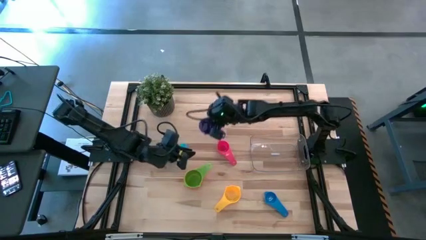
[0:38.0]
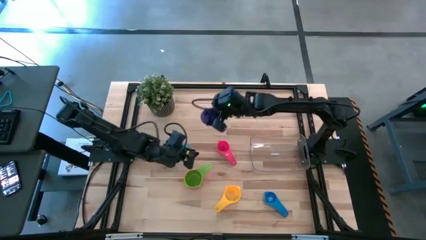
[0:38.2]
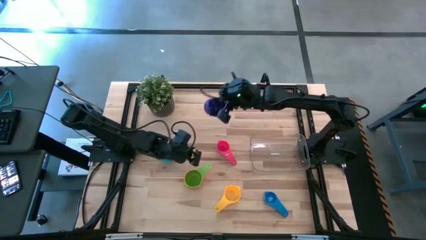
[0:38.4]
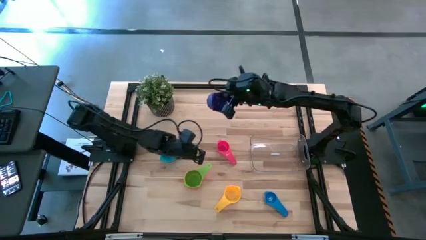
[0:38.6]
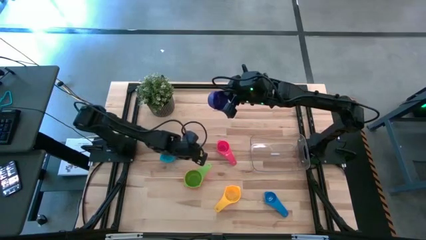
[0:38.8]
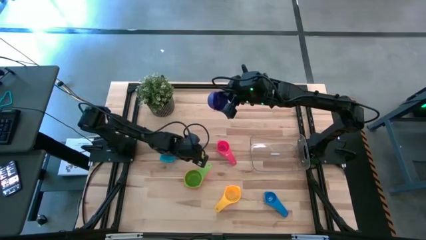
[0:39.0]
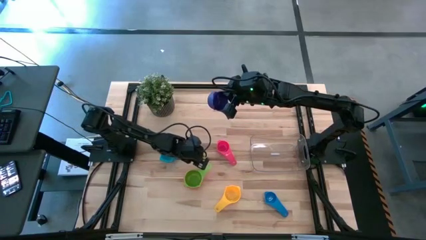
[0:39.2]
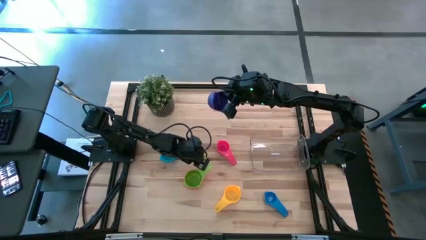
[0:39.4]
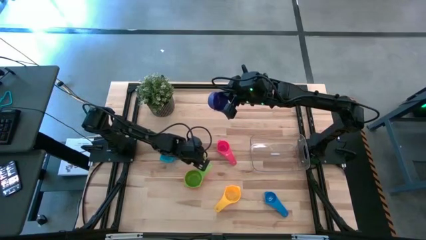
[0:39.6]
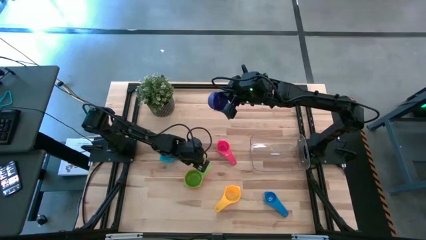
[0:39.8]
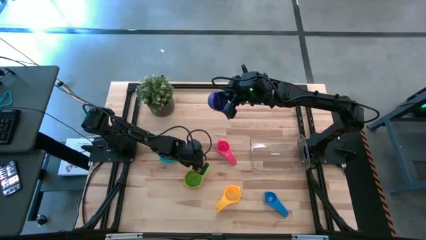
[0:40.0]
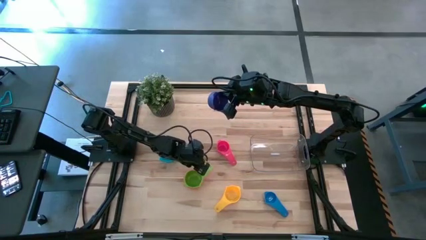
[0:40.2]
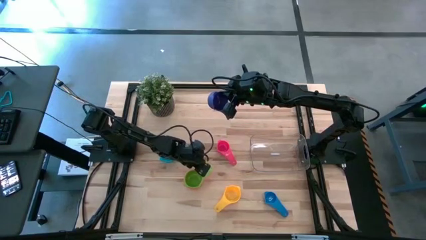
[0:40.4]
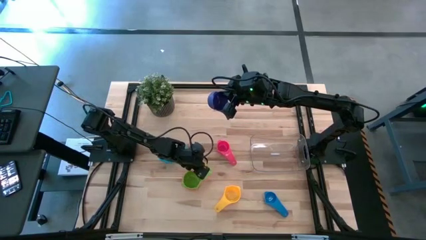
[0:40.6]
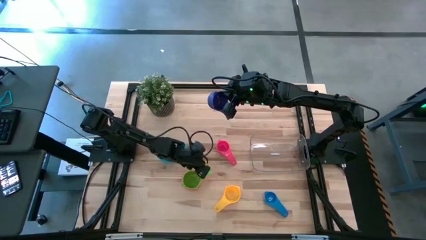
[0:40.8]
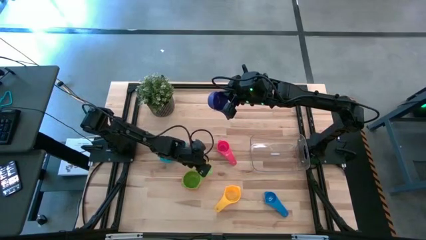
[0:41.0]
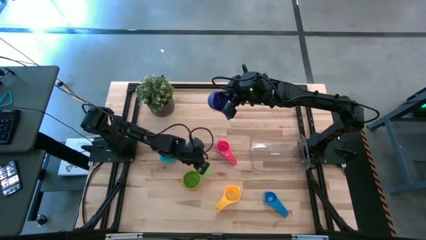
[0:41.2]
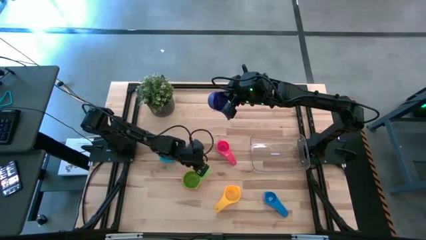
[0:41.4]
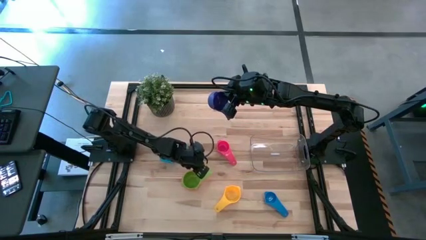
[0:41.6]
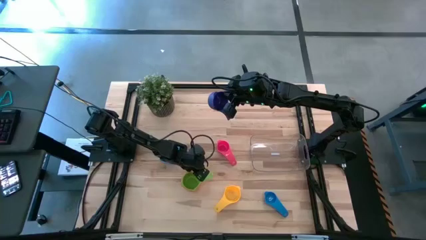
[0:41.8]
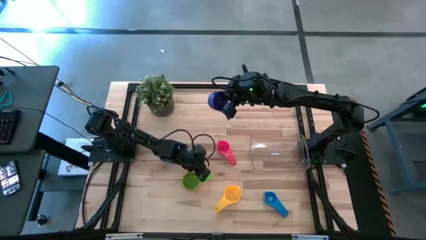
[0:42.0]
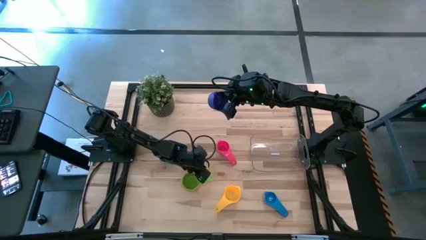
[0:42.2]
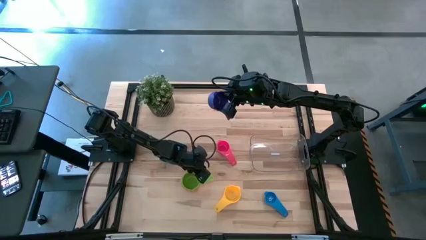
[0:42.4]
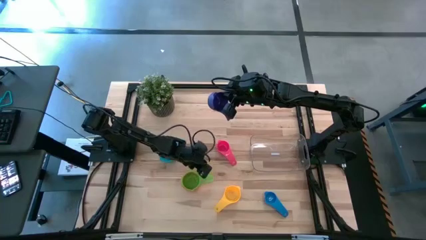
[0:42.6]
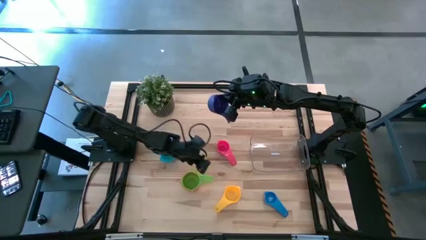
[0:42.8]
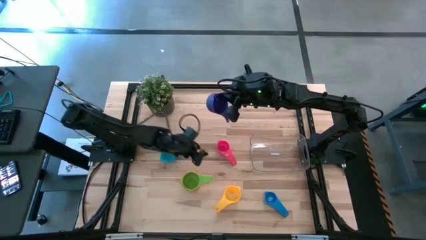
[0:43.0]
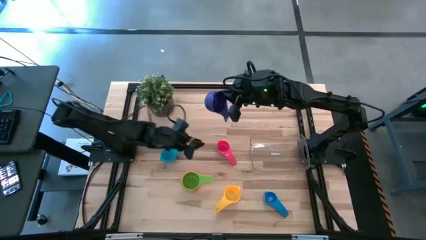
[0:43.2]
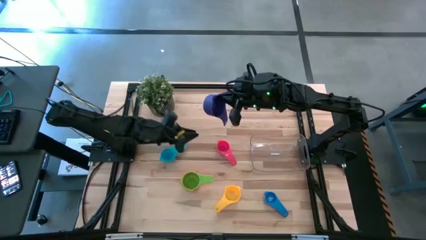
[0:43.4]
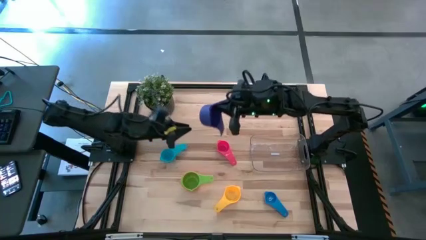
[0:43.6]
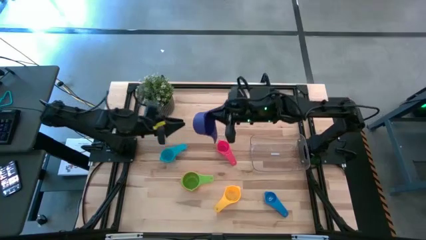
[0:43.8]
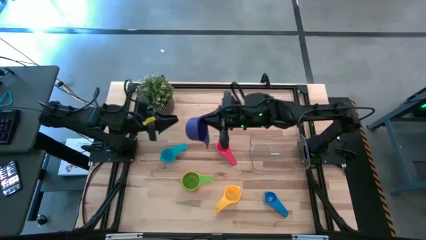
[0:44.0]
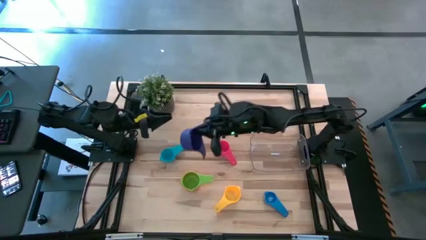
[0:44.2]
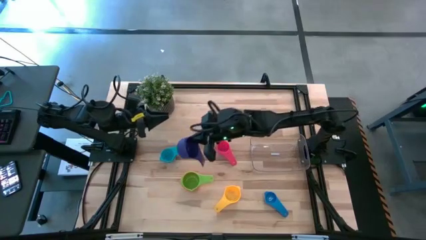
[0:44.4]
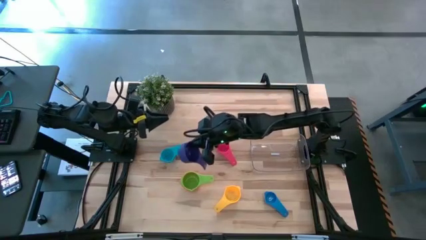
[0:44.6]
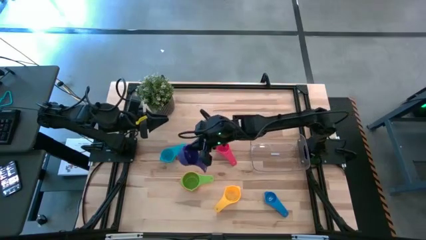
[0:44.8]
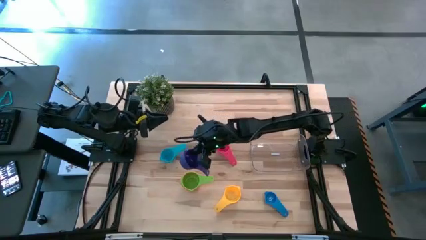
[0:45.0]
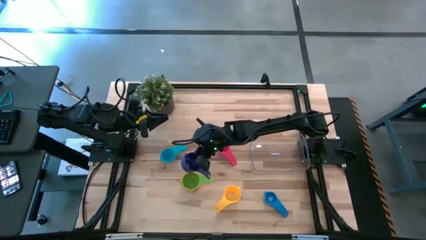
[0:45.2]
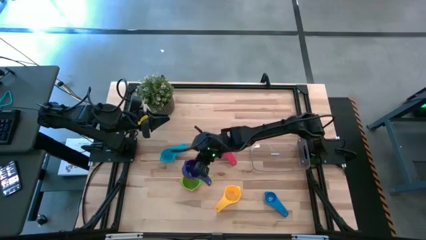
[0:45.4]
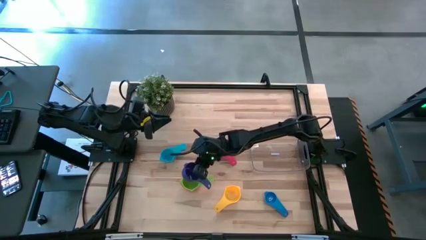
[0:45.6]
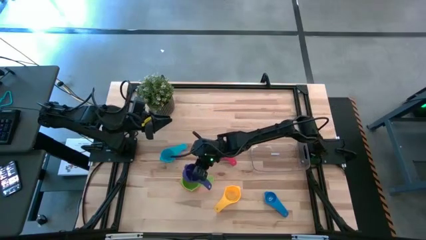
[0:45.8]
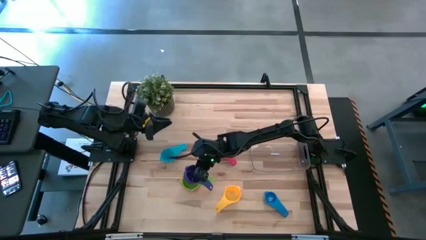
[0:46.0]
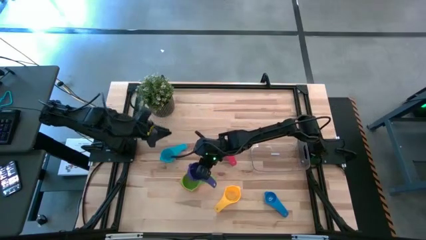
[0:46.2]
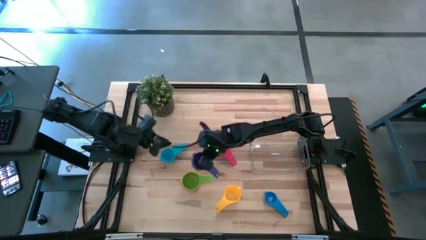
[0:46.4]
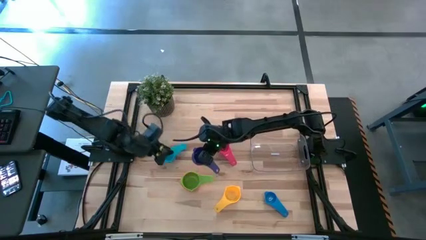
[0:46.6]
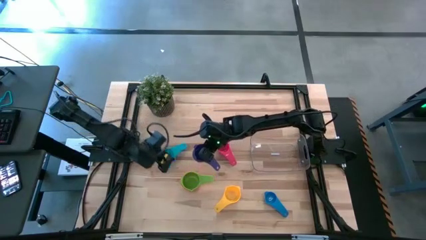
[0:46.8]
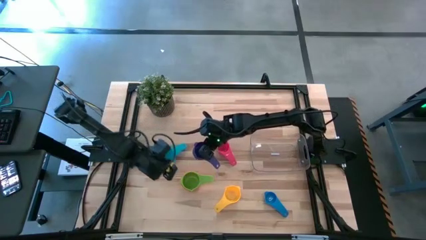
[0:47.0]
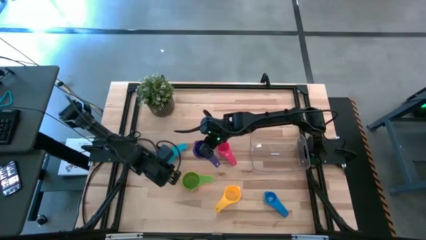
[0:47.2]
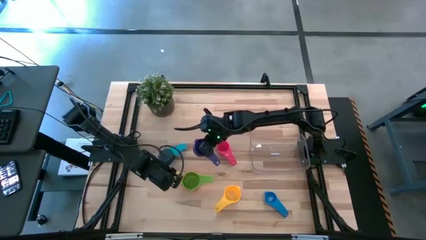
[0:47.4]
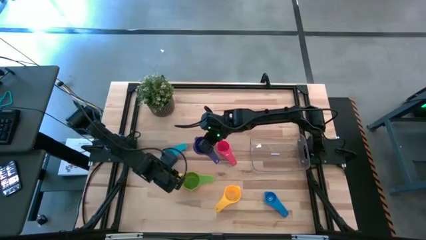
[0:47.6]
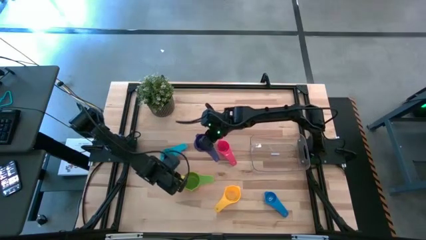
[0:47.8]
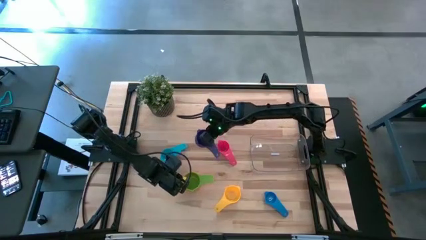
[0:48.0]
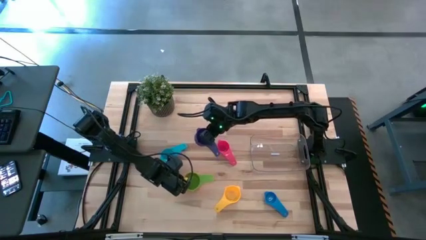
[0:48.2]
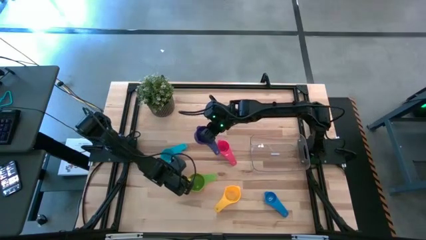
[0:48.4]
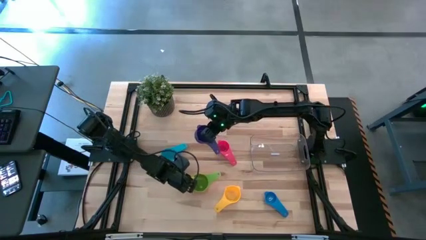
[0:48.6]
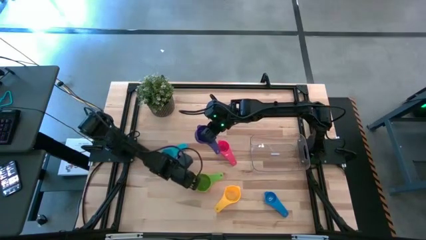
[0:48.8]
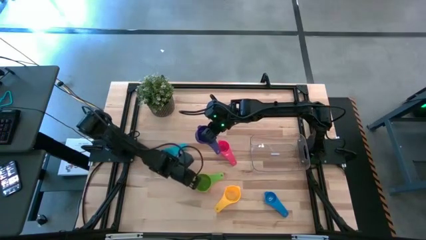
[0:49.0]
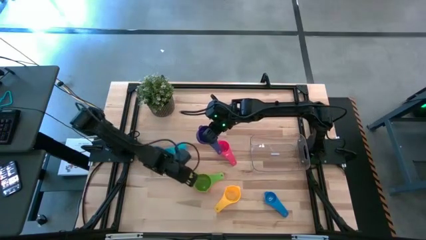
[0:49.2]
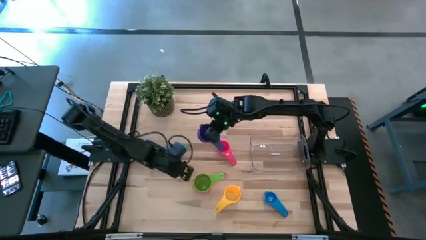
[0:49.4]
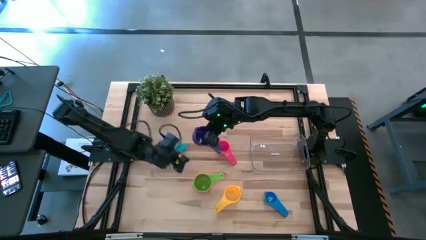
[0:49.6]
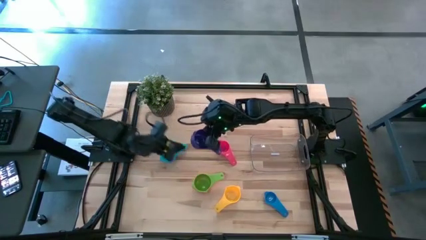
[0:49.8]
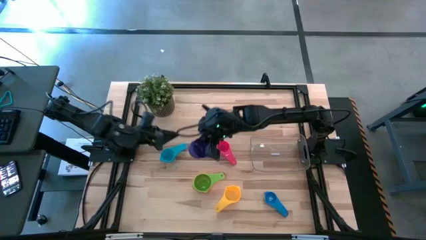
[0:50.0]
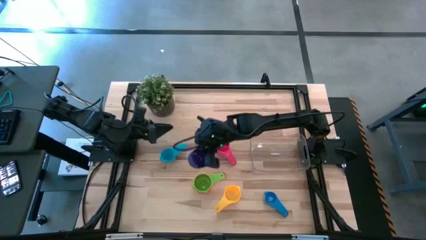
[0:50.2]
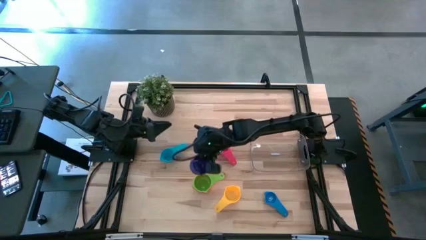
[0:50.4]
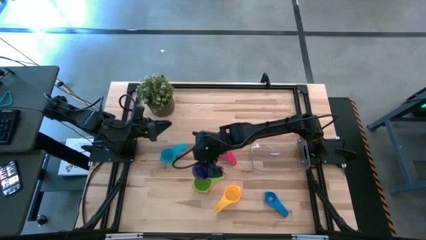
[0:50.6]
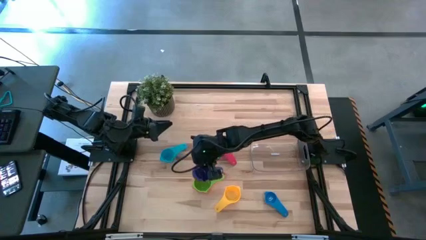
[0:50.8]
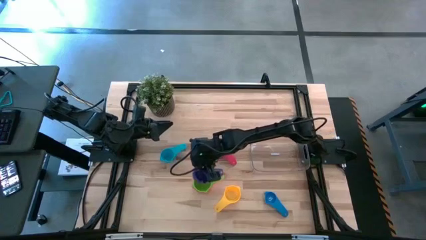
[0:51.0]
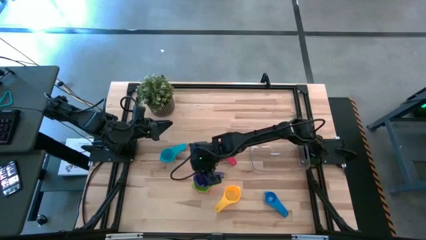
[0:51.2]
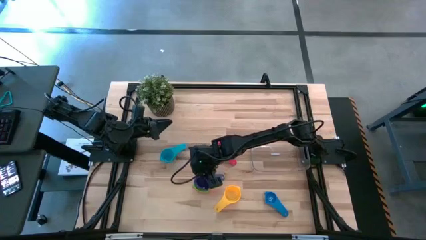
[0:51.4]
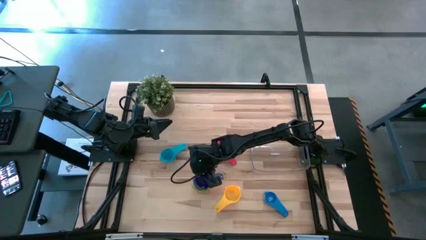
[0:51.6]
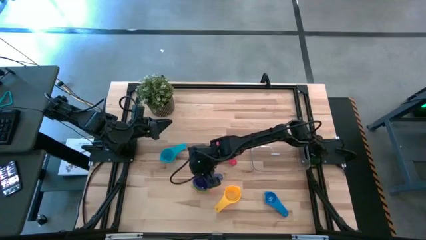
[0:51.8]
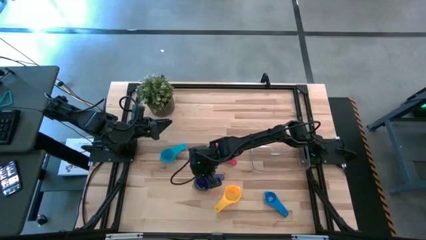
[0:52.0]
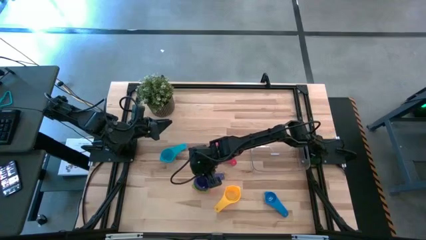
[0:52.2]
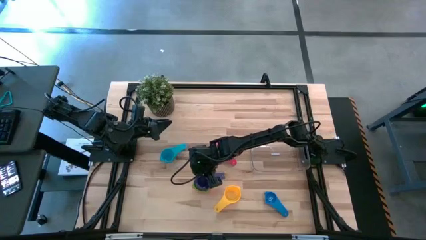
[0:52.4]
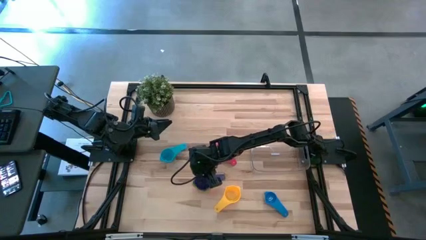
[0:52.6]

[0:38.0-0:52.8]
Task: Nest measuring cups in basket
Stack the purple measuring cup on top of the green measuring cup

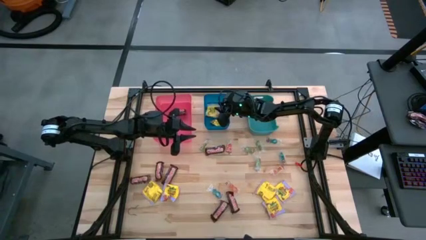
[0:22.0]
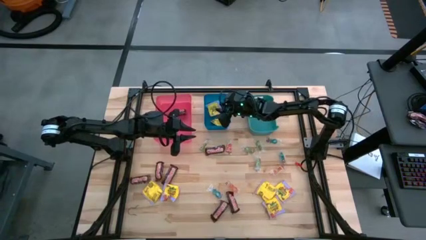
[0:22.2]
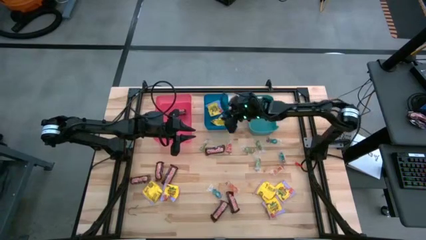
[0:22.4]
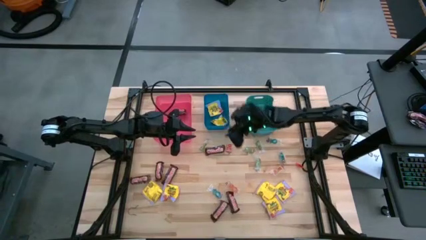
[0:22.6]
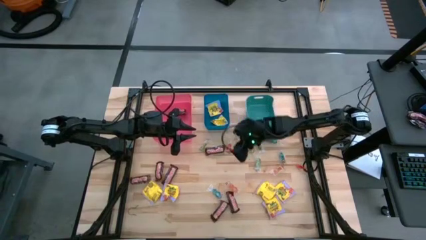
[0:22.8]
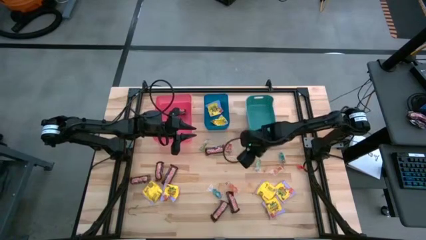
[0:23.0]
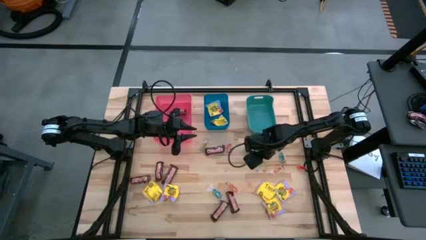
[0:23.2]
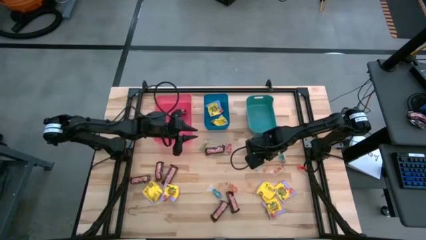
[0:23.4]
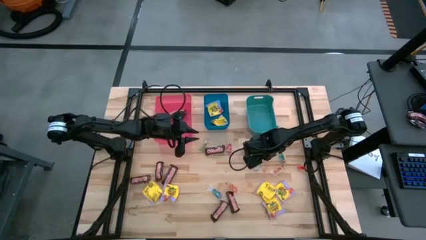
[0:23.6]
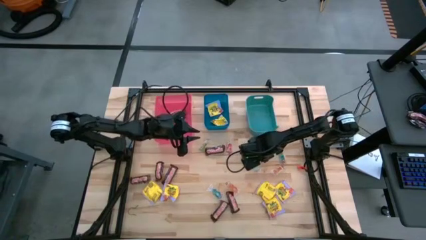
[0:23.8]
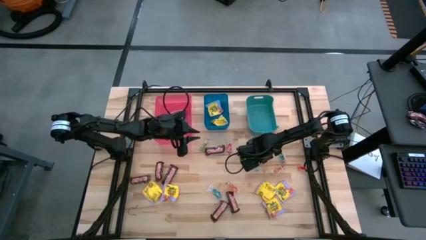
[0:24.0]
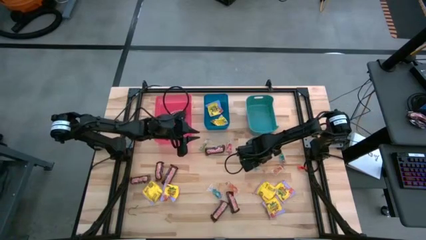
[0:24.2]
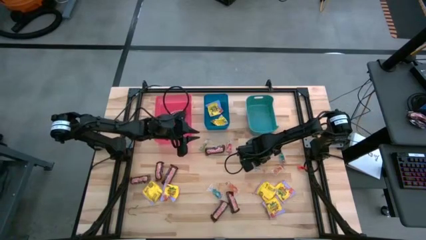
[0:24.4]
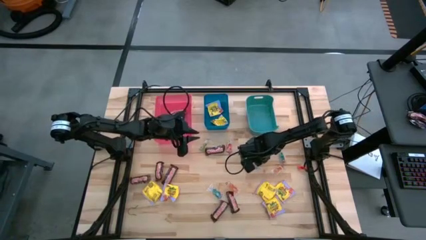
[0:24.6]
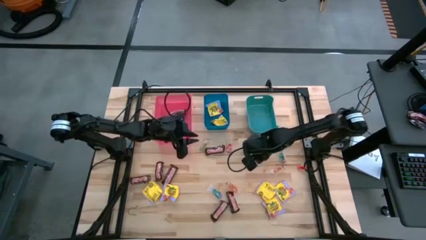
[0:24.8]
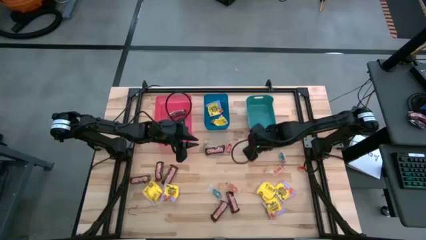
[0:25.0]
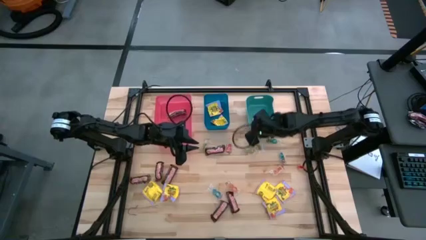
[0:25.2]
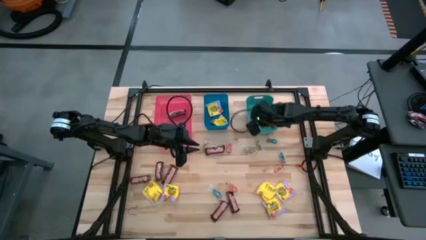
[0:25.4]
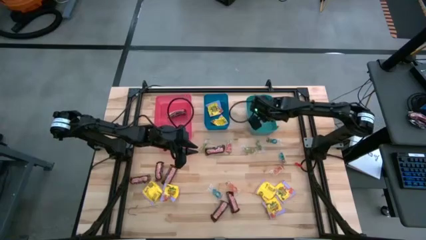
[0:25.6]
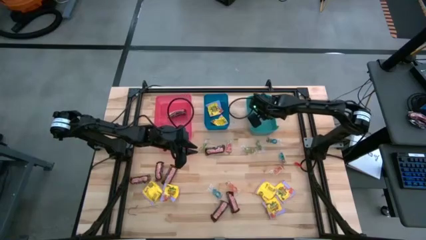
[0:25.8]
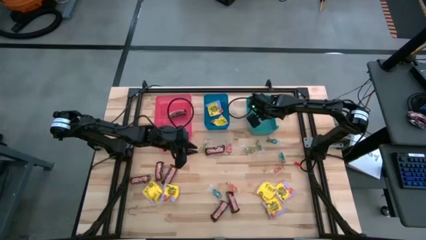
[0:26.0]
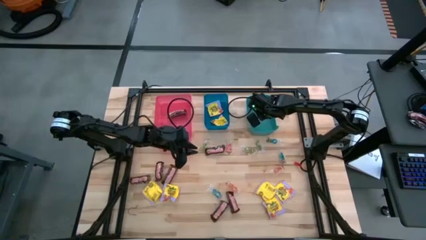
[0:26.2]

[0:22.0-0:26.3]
Task: Sort candy
Put the green gummy candy into the green bin
